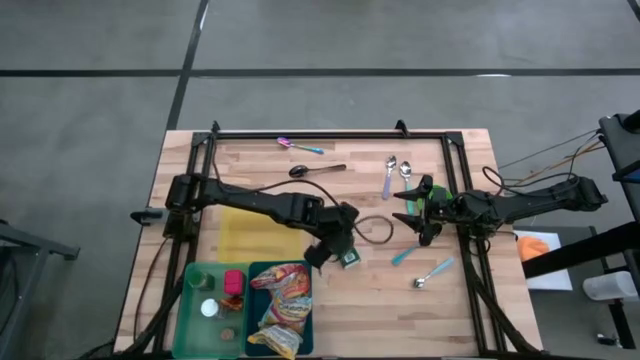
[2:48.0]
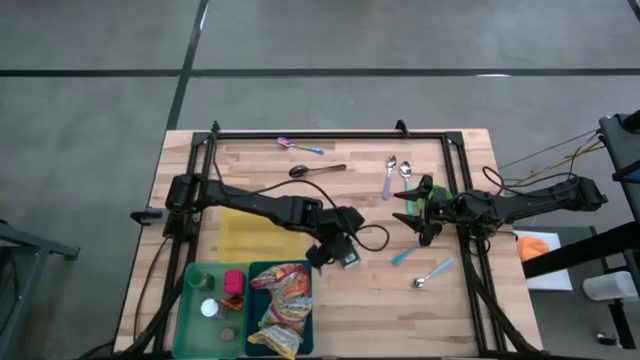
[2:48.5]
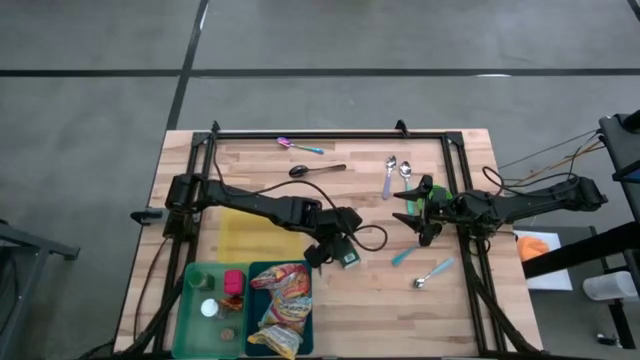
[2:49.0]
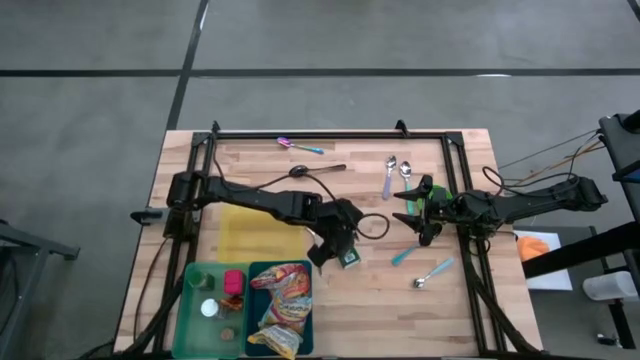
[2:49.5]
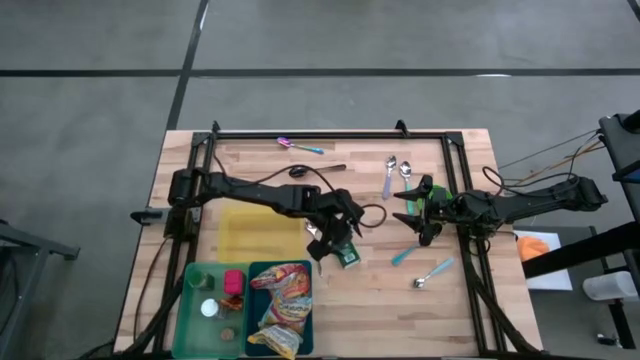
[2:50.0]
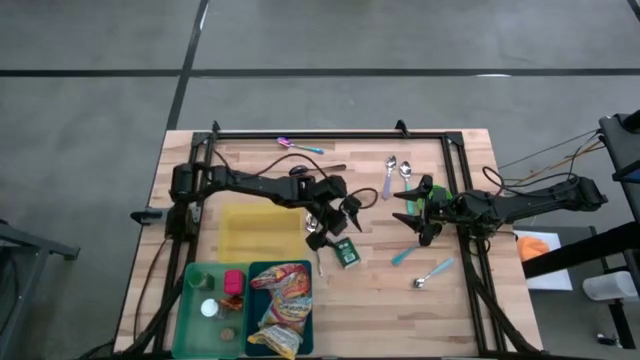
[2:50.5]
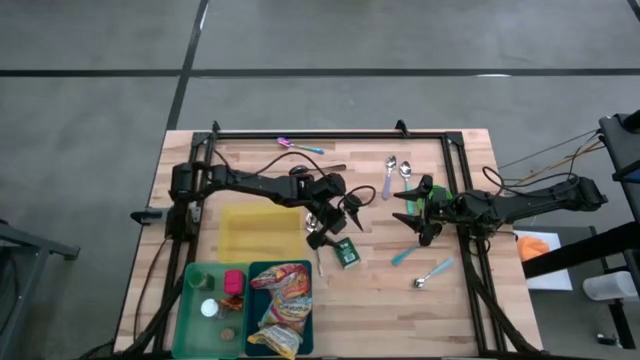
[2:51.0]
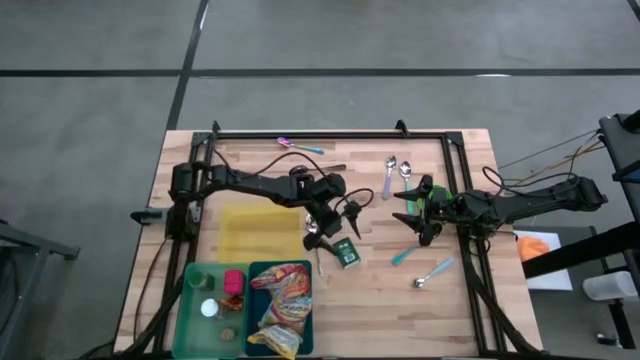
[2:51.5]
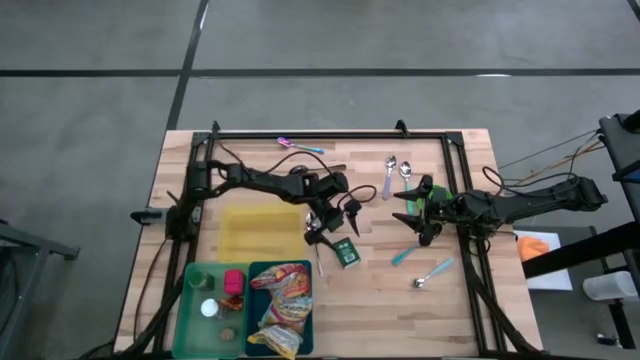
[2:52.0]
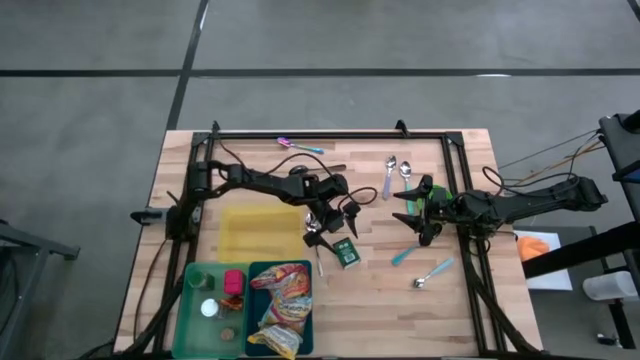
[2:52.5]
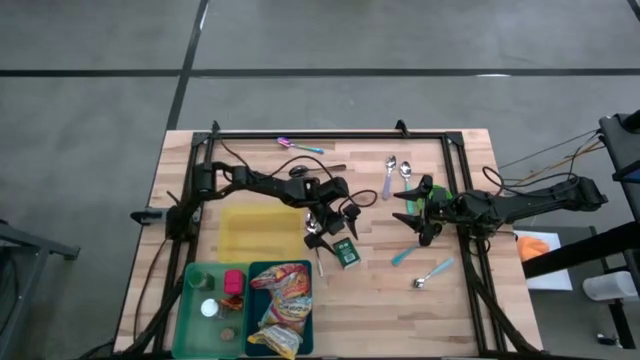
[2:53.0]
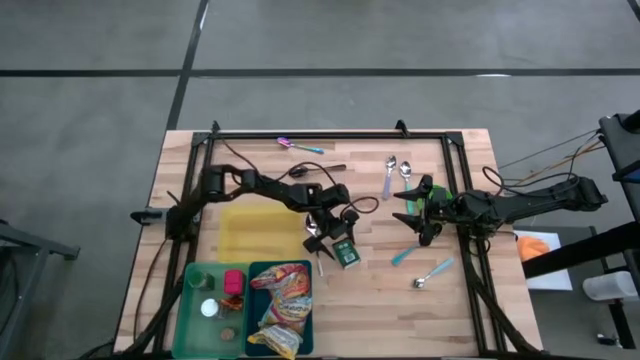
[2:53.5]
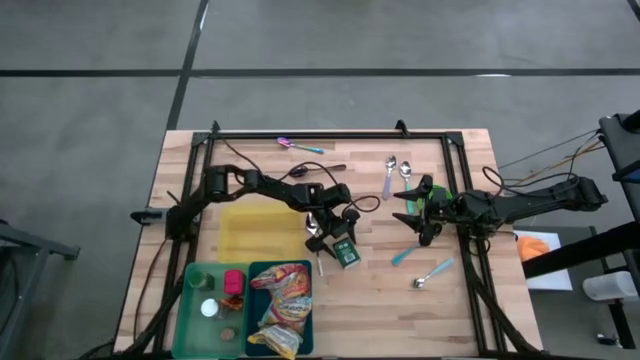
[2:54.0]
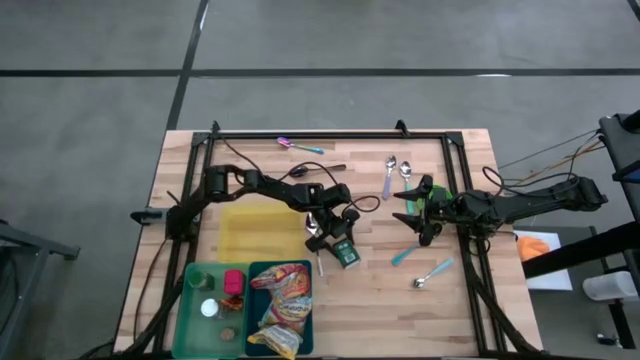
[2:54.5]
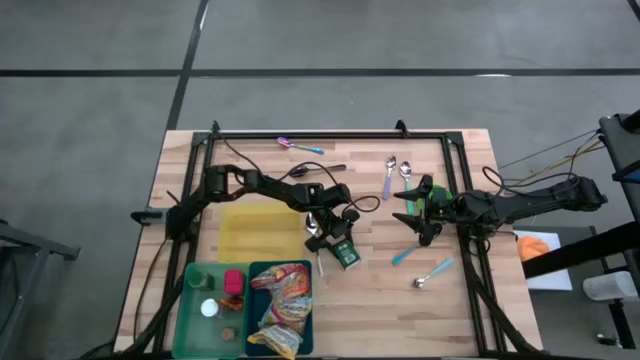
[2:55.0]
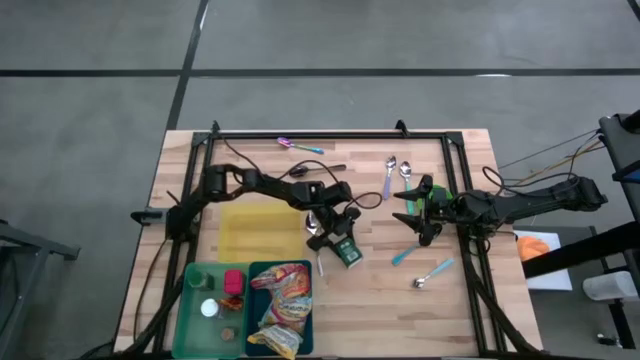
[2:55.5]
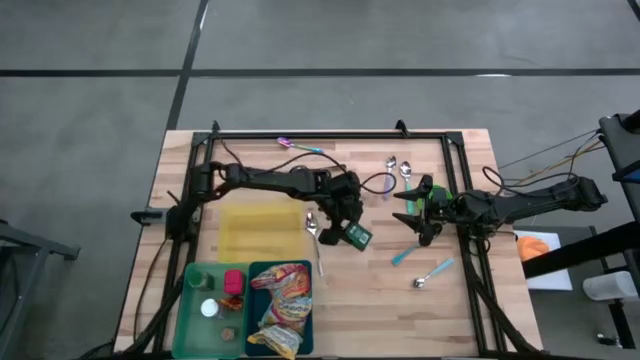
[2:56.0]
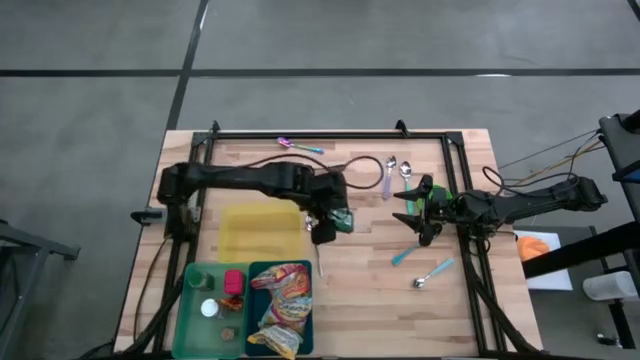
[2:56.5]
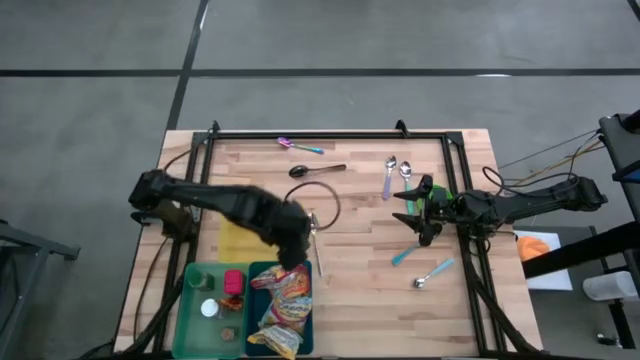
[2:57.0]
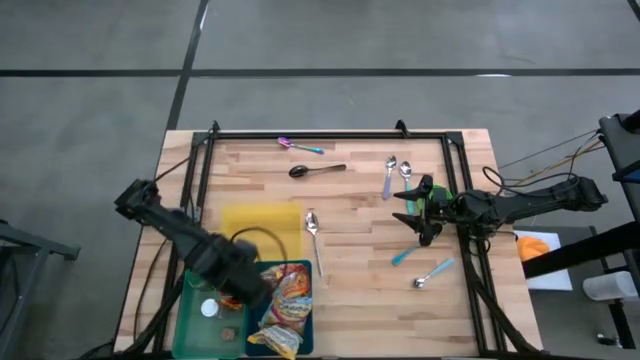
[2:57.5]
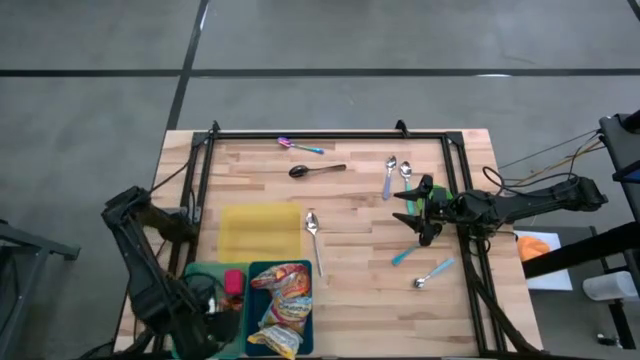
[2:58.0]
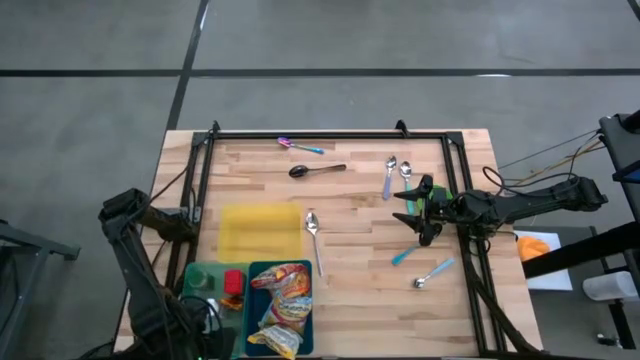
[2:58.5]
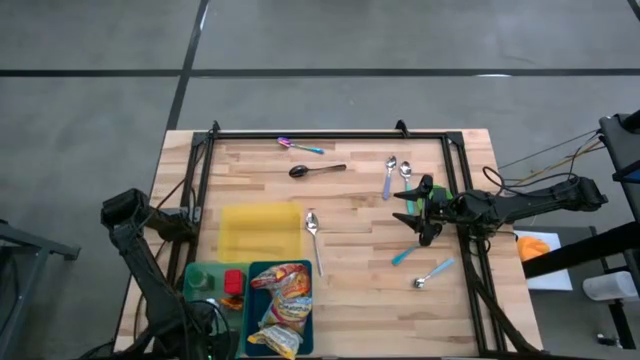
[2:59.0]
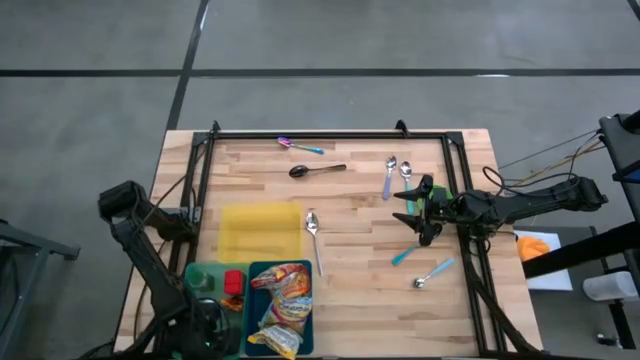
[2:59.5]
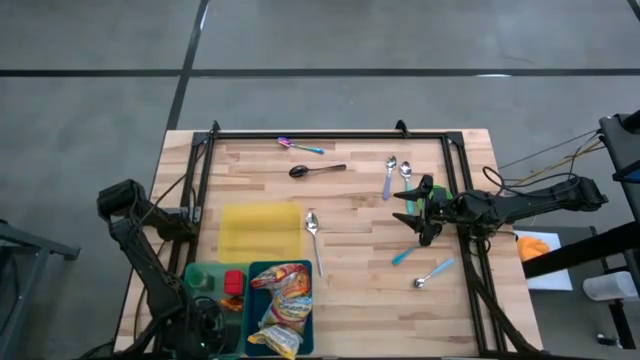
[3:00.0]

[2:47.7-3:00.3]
Put the black spice can into the green bin

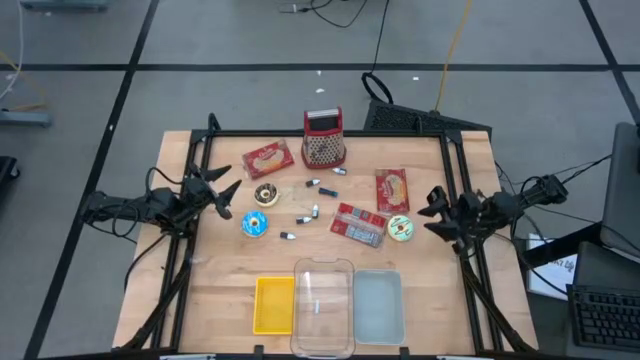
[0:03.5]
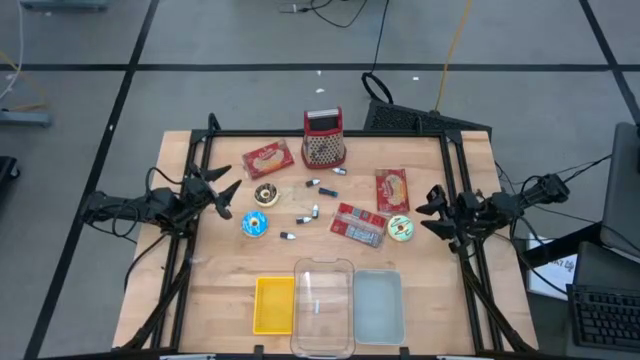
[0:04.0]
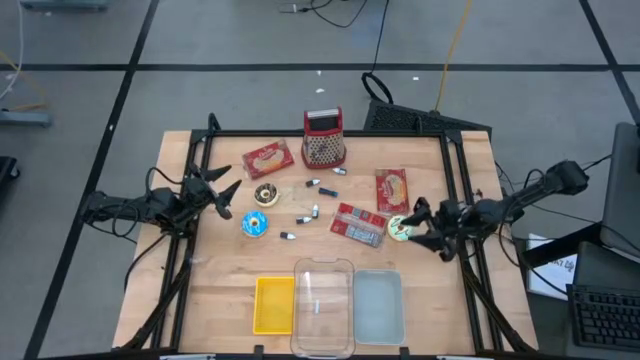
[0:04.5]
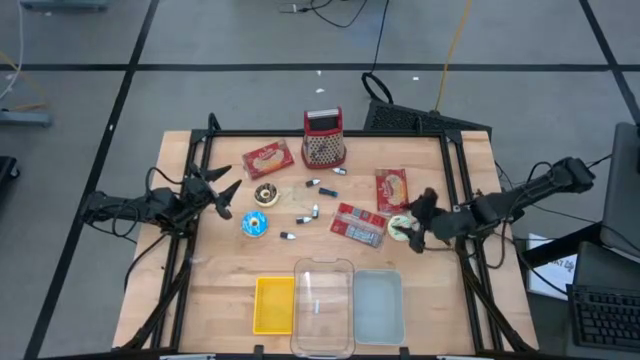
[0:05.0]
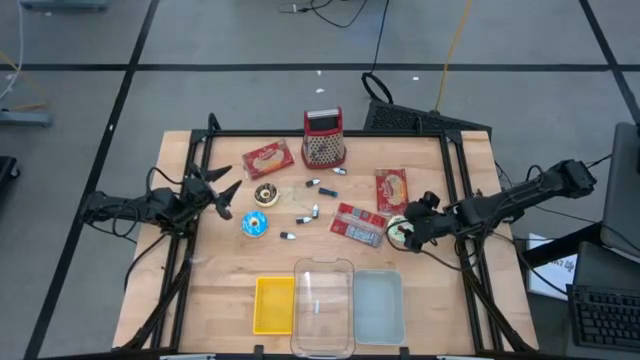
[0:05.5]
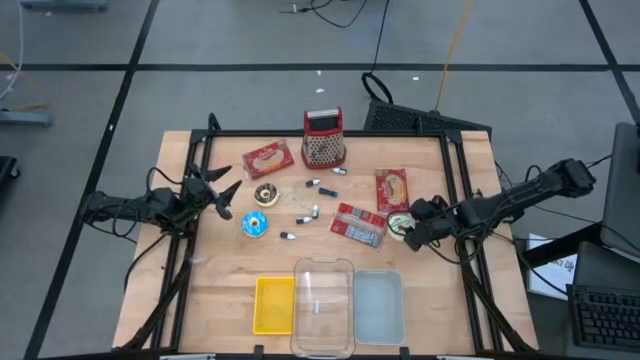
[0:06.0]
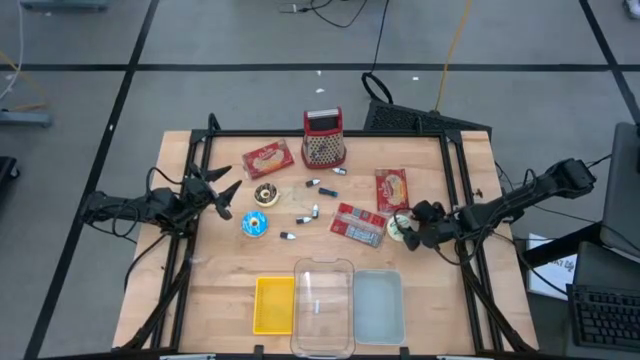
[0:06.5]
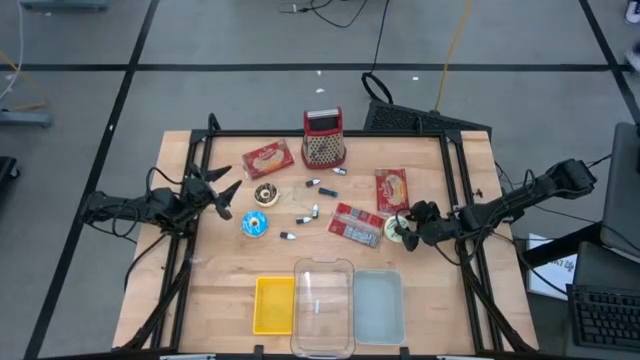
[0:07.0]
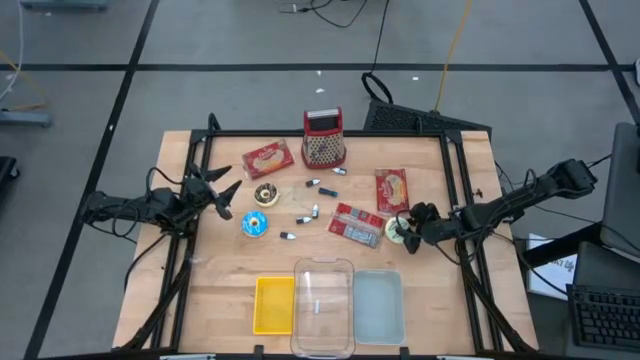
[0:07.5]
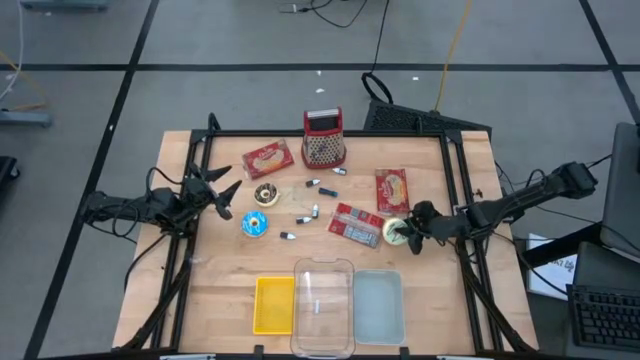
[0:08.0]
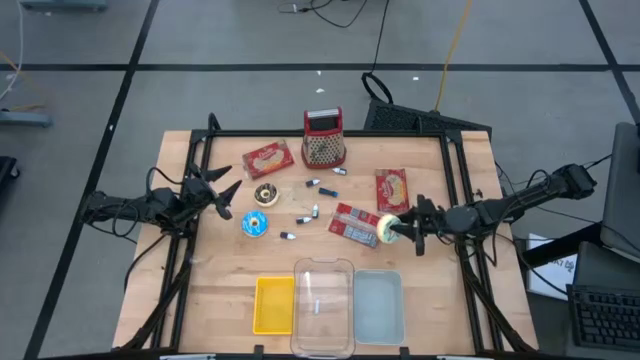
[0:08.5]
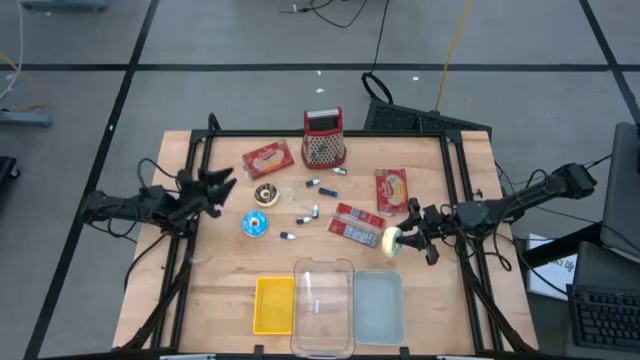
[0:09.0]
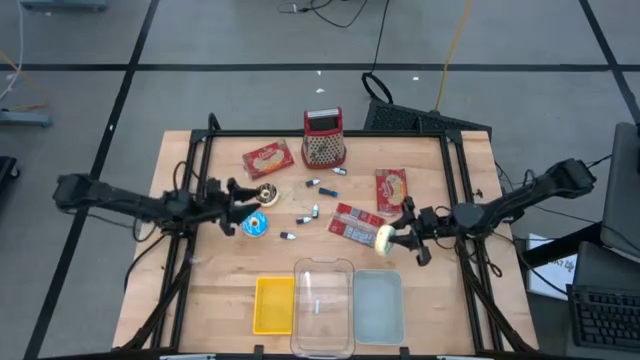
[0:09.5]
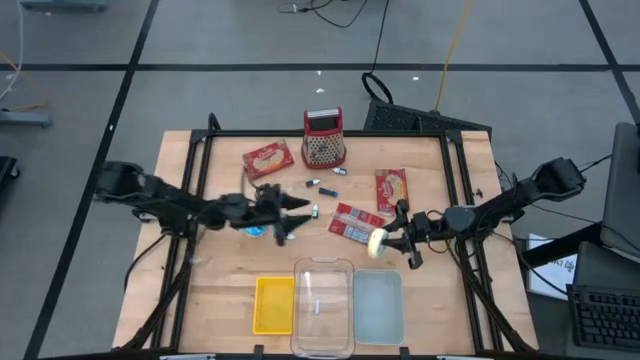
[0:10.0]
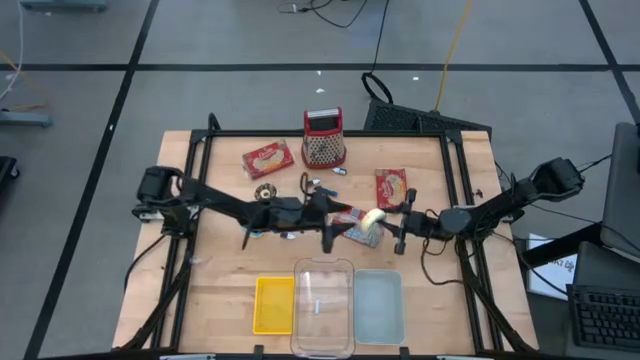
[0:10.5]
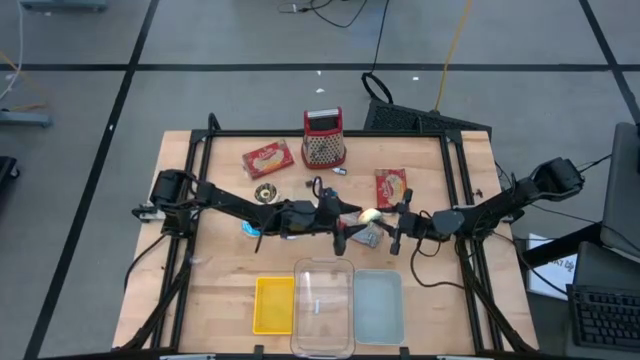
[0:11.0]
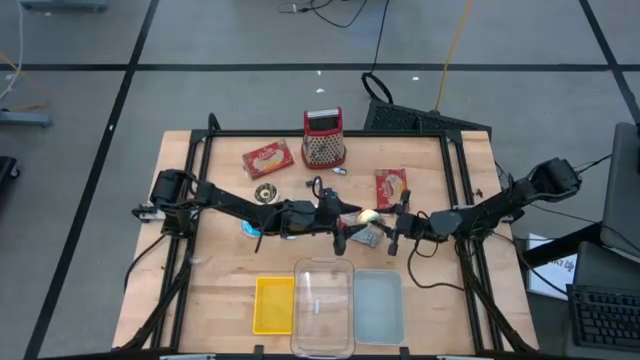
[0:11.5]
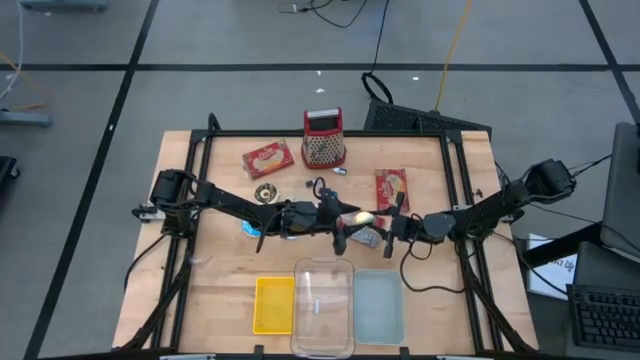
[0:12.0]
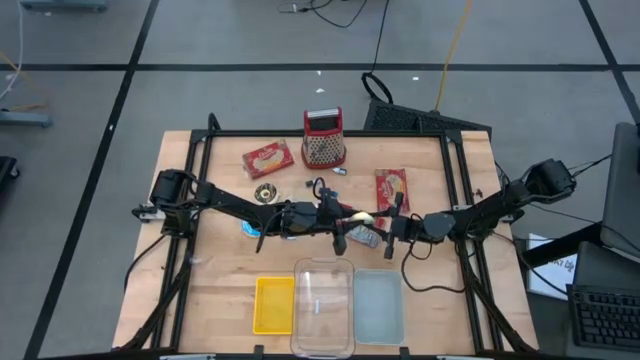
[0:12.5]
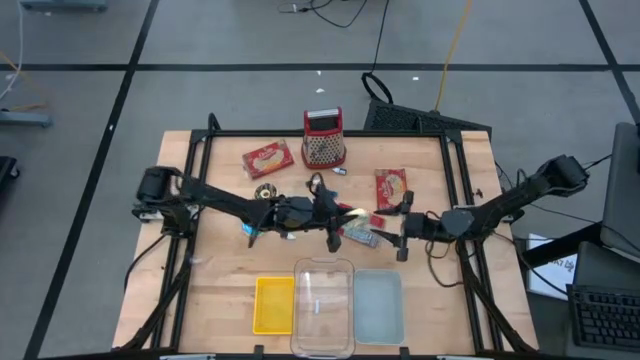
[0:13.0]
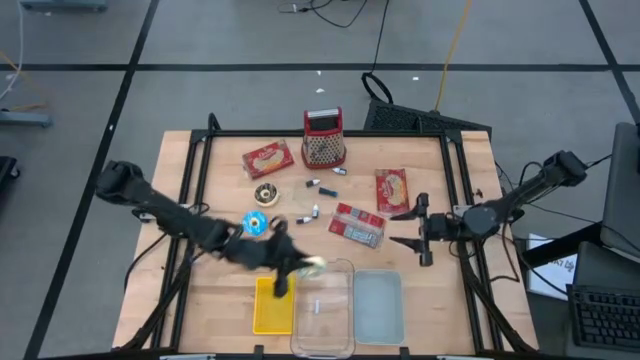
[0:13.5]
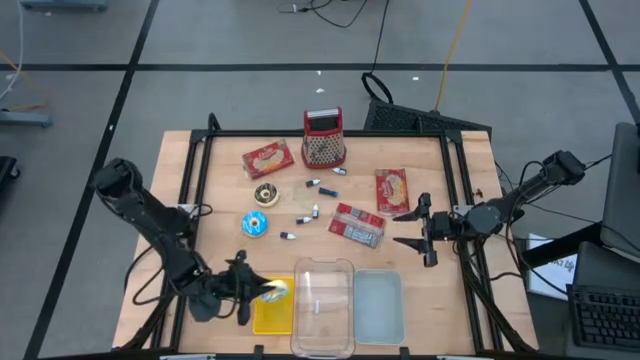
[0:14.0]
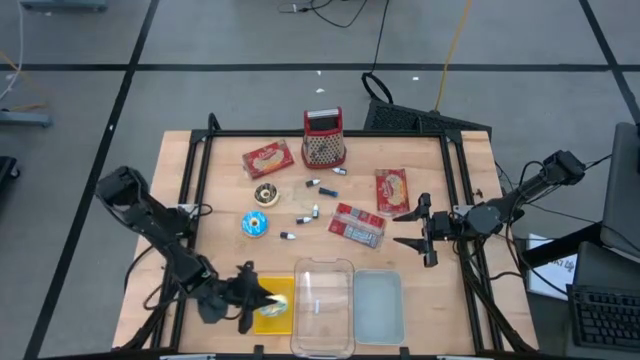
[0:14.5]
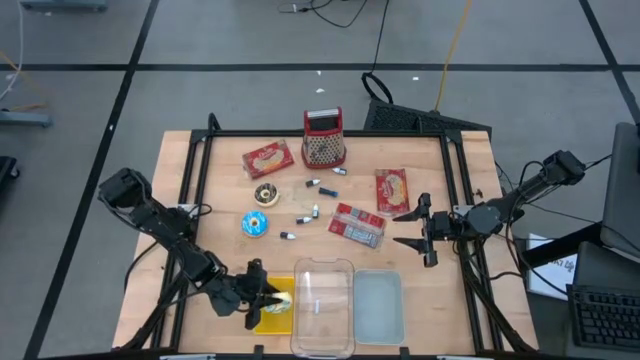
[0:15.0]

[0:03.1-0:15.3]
Put the light blue donut into the yellow bin
